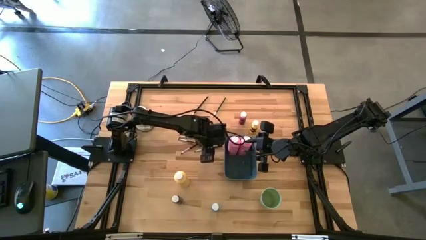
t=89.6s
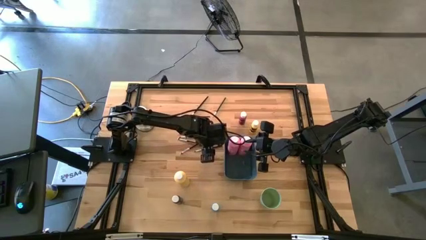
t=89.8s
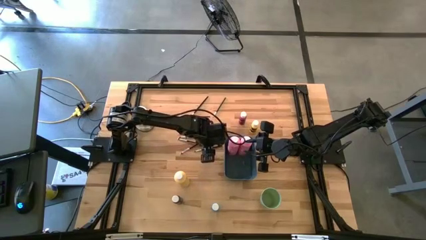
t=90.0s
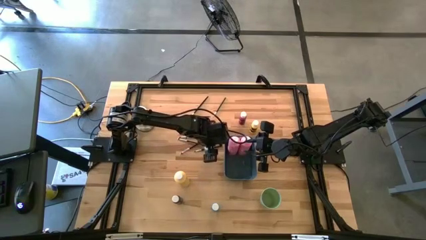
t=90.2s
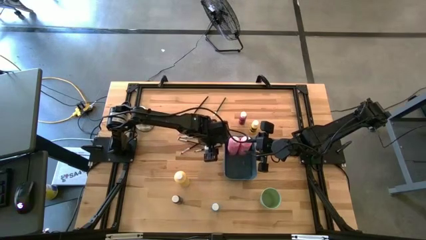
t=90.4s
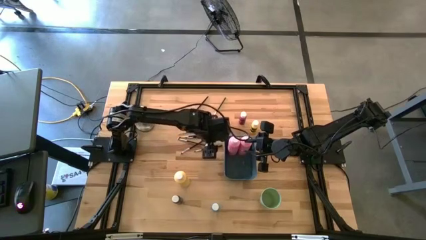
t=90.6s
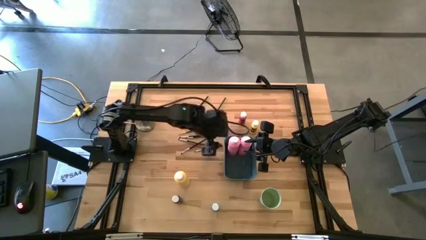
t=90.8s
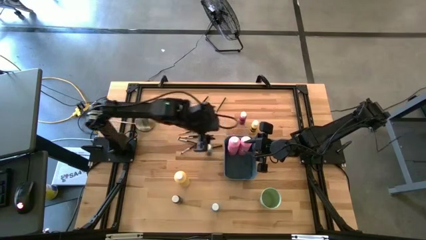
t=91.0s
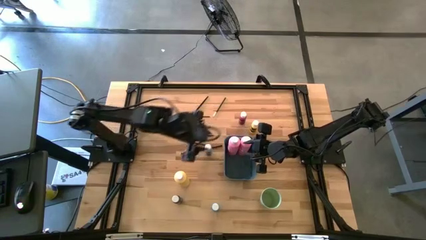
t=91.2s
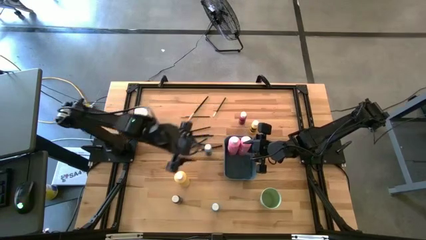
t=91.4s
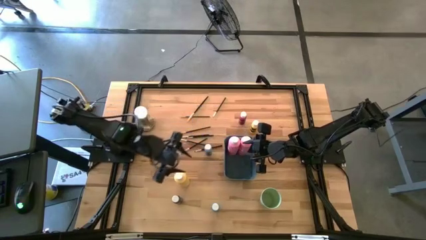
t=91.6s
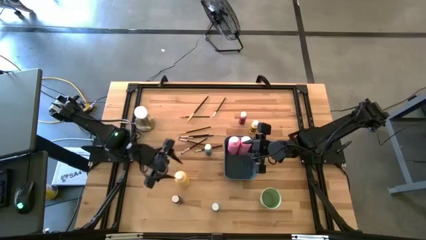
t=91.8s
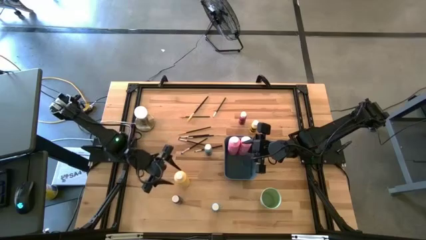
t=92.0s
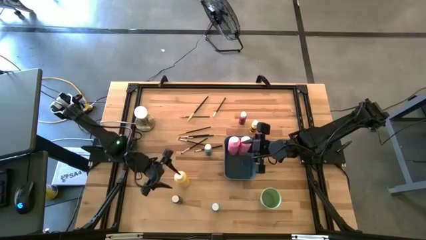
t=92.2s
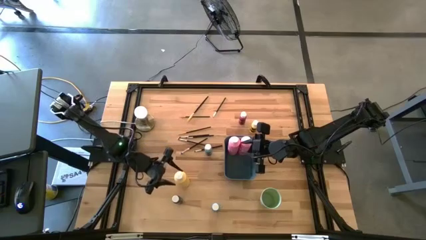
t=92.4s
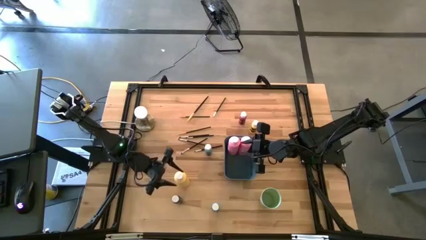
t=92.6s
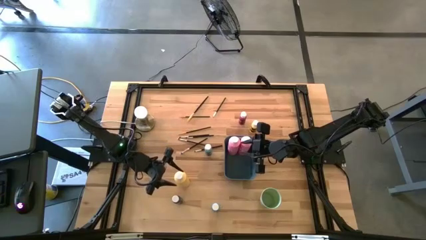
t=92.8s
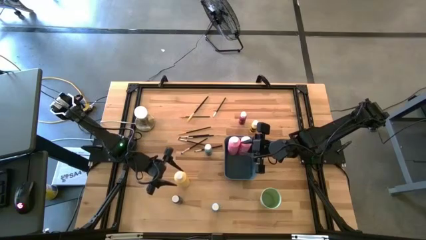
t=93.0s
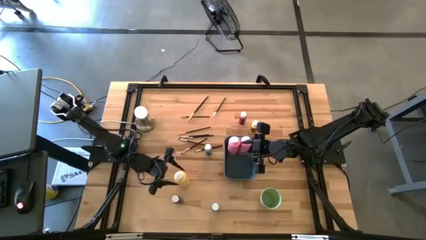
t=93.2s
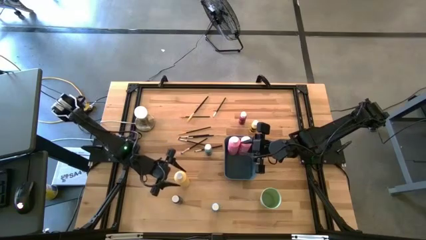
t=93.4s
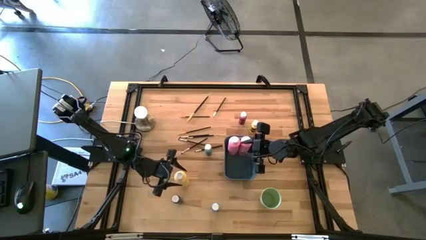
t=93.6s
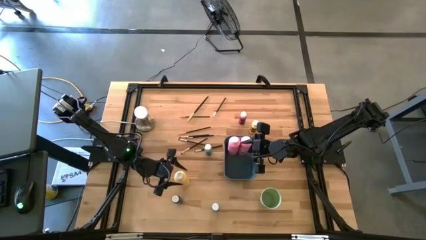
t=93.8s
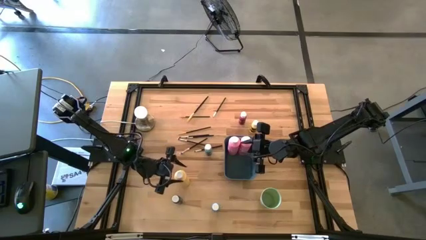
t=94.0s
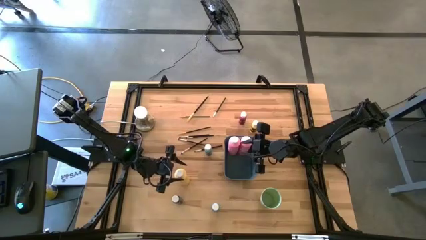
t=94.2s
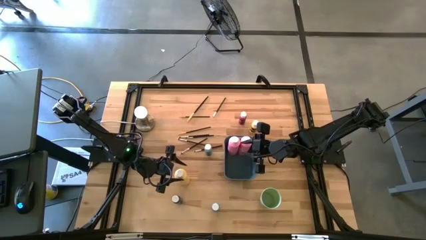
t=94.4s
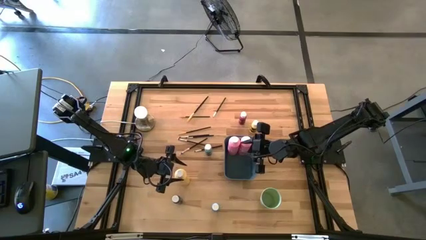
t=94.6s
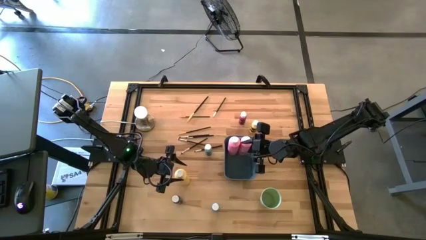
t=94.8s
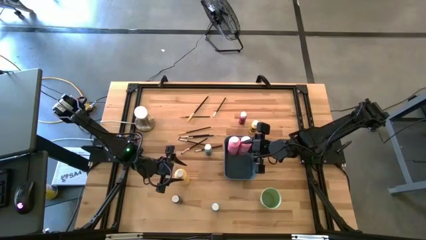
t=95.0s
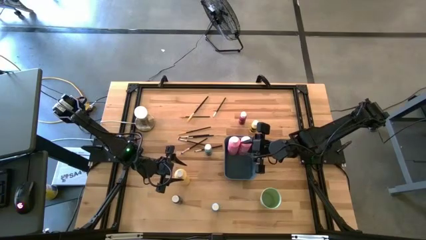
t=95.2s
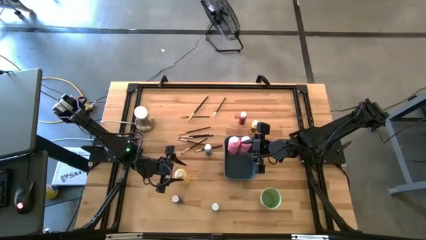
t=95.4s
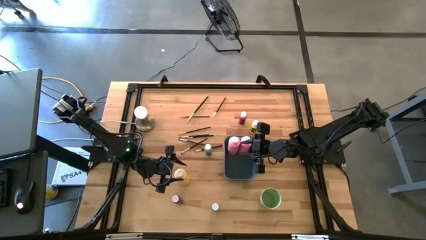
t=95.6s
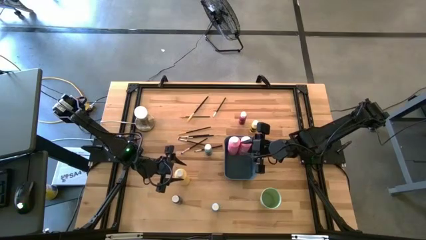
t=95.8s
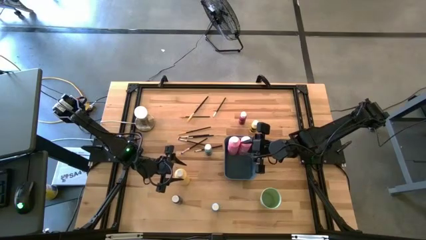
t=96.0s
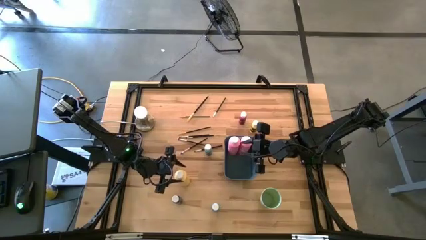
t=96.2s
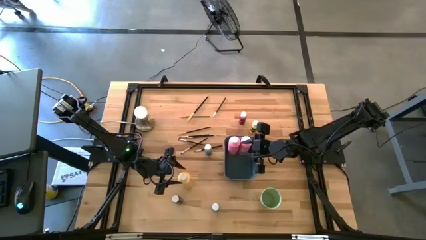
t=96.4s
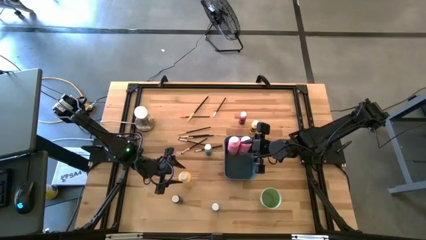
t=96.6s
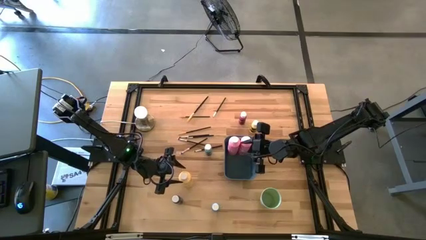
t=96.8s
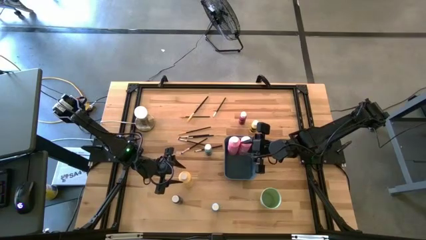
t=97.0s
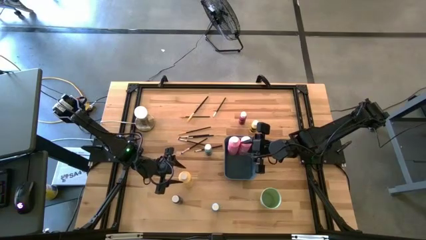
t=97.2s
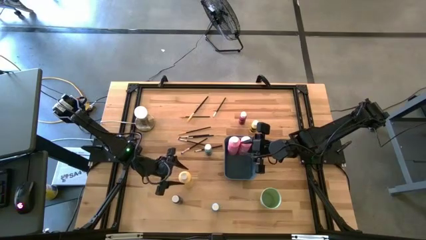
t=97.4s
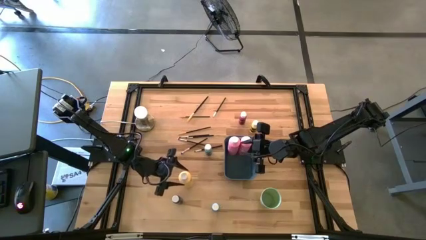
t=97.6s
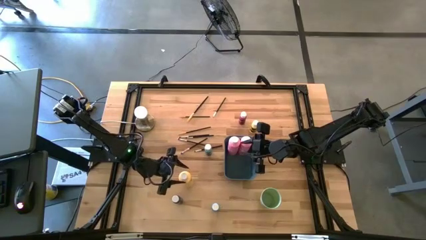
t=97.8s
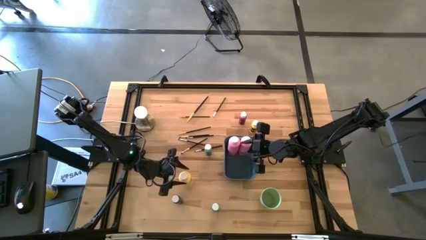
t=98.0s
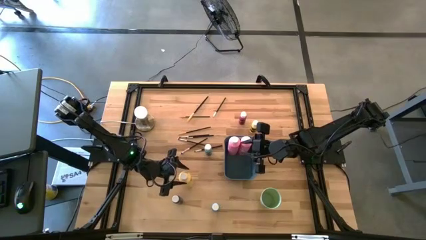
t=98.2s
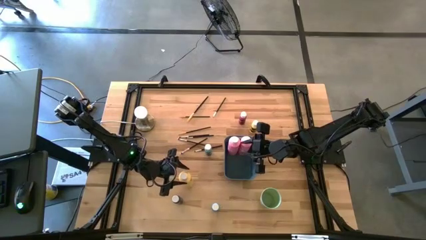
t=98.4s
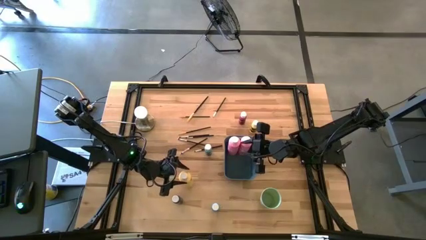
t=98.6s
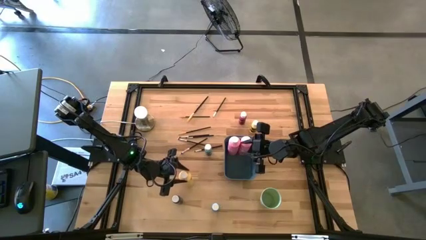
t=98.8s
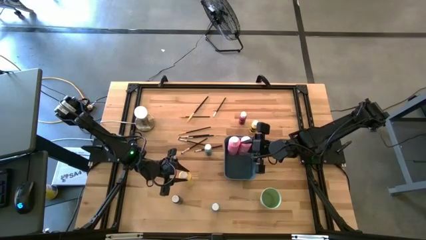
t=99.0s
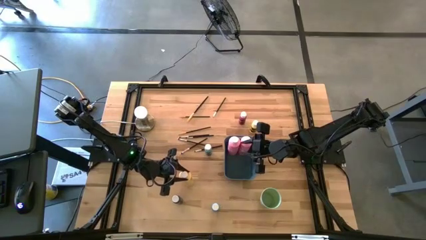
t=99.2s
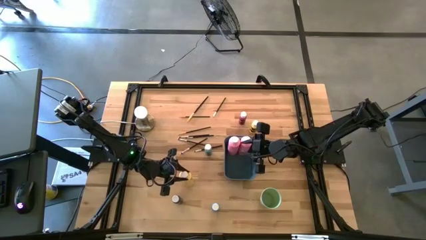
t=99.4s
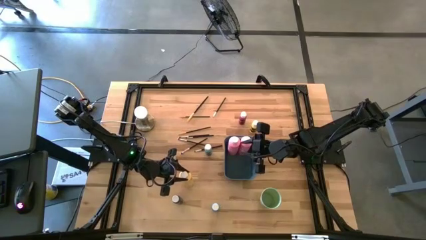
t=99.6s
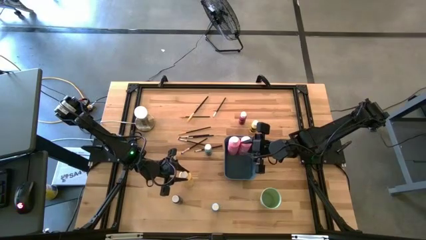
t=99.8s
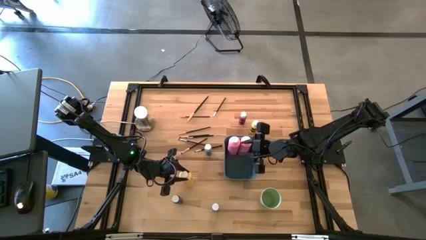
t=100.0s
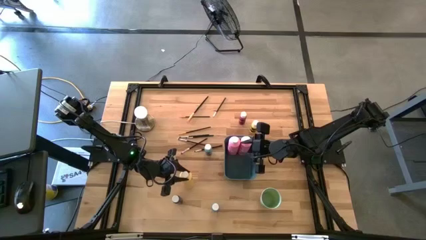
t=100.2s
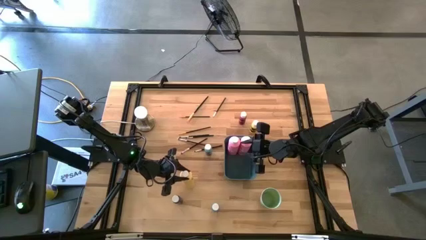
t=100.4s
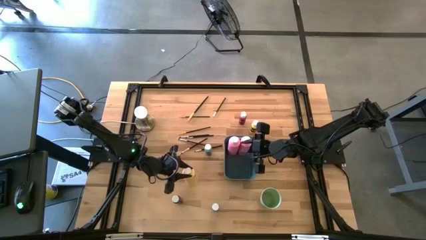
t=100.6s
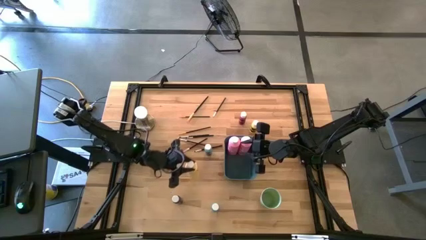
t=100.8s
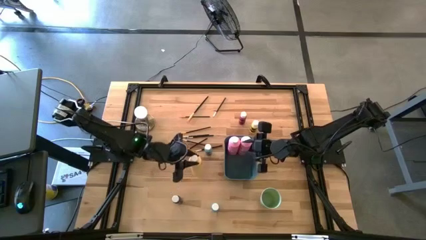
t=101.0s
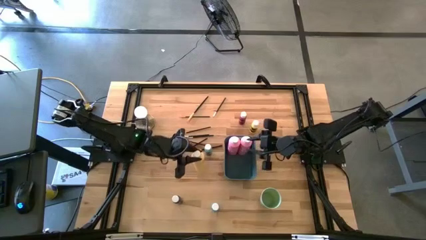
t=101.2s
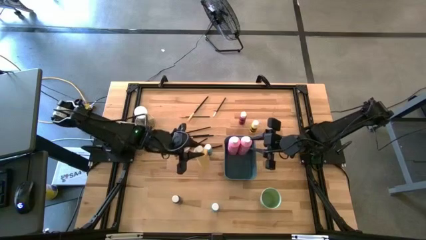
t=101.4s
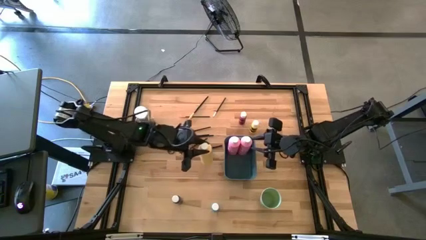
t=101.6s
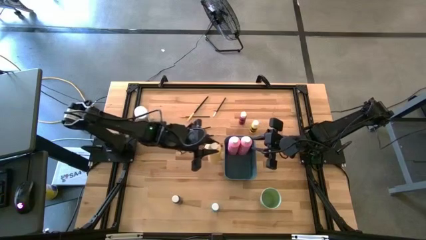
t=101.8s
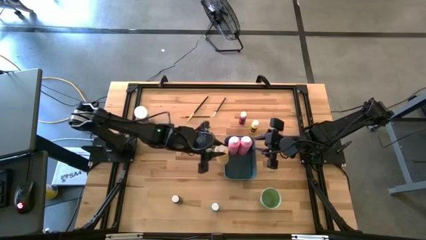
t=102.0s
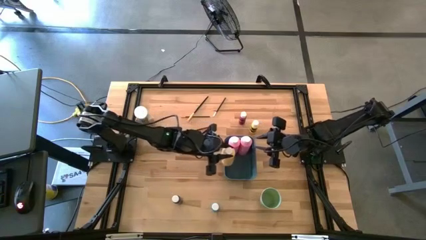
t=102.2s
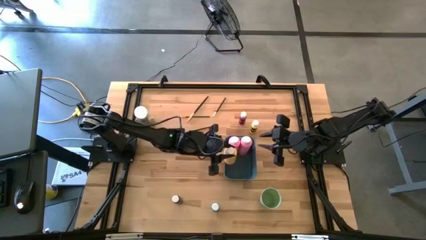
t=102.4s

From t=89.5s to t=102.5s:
Task: Pick & Place Paint Supplies
Put the large yellow paint bottle into the blue bin

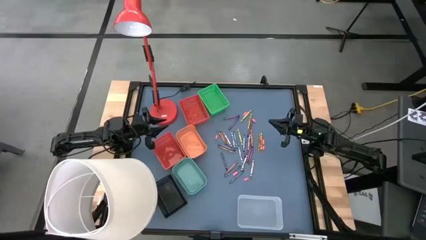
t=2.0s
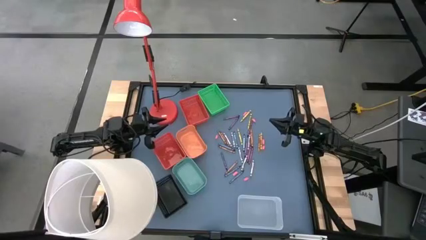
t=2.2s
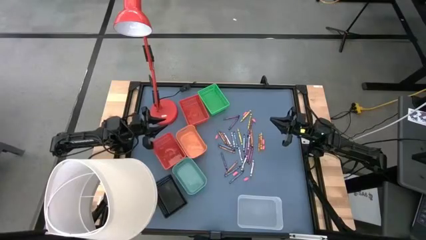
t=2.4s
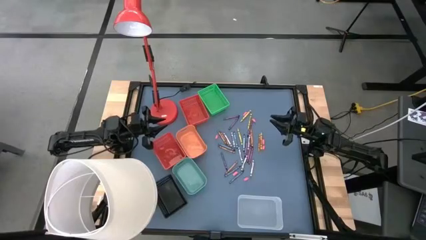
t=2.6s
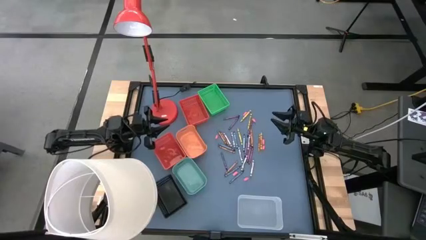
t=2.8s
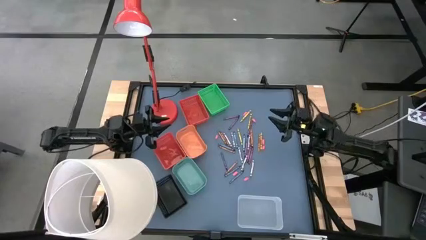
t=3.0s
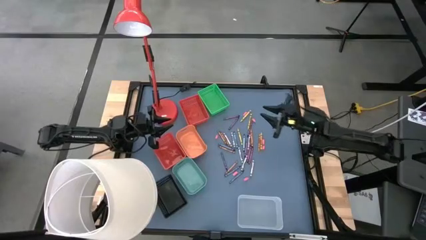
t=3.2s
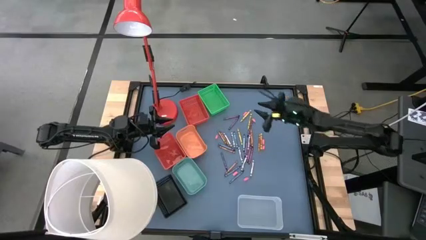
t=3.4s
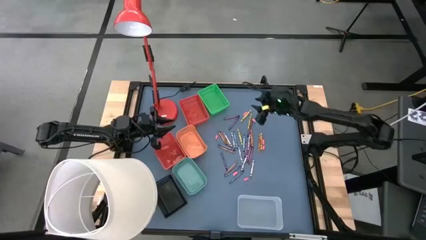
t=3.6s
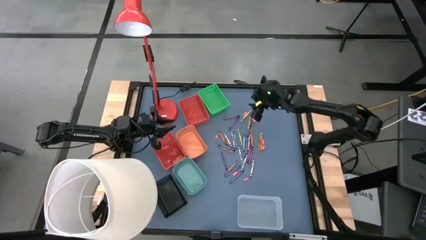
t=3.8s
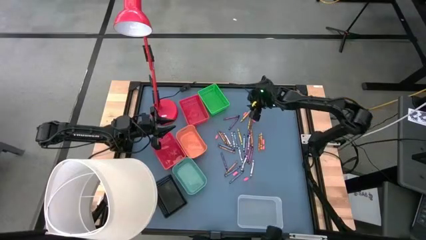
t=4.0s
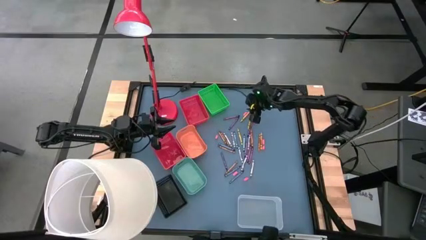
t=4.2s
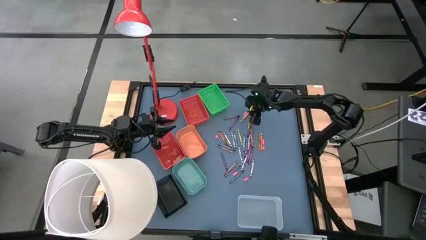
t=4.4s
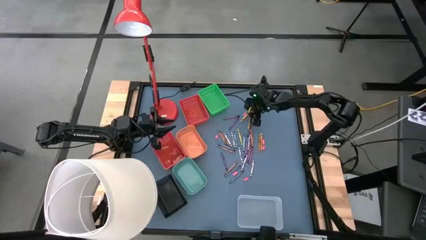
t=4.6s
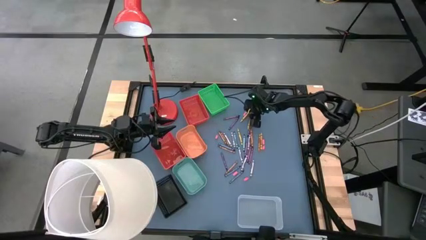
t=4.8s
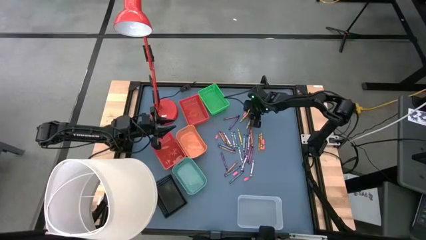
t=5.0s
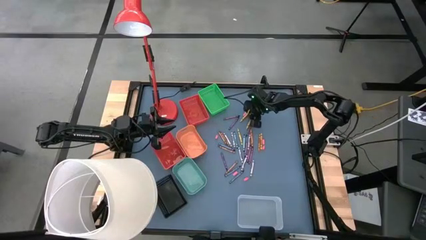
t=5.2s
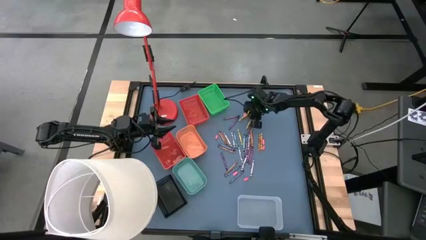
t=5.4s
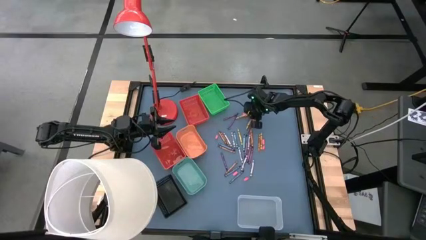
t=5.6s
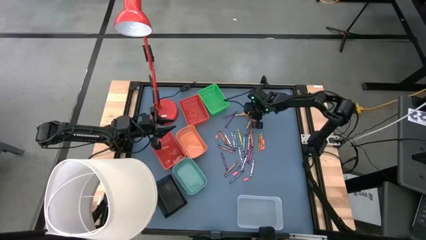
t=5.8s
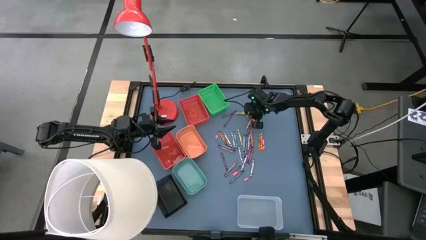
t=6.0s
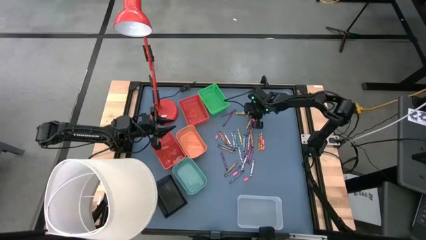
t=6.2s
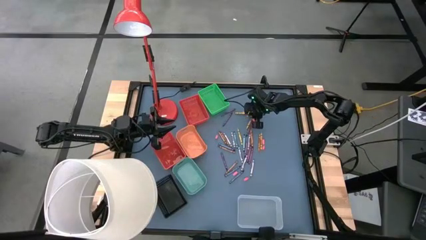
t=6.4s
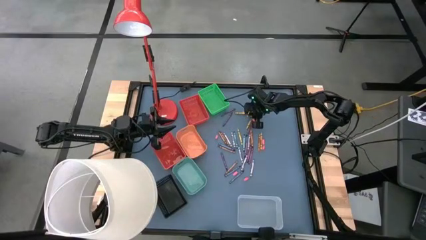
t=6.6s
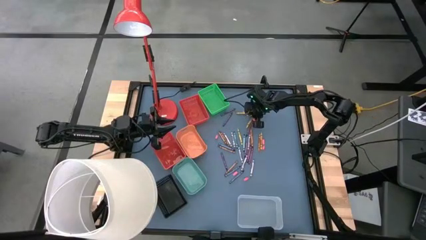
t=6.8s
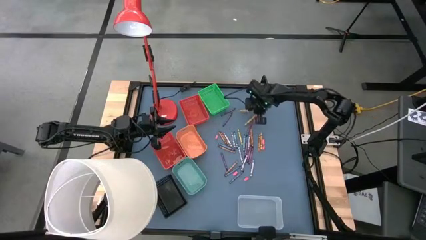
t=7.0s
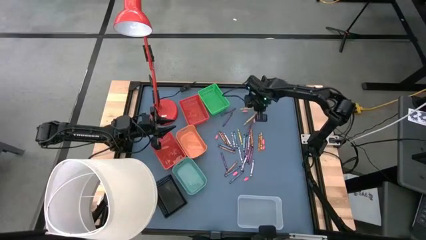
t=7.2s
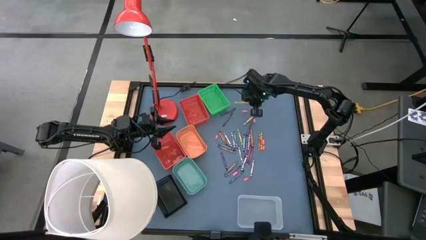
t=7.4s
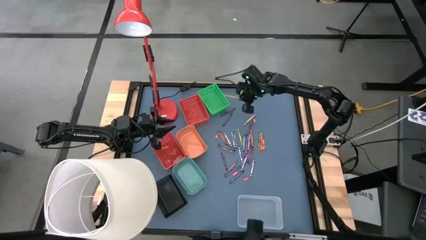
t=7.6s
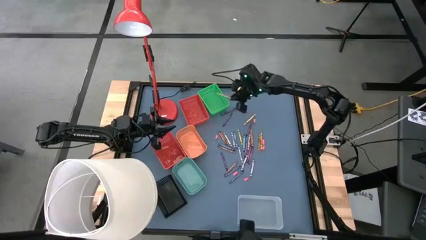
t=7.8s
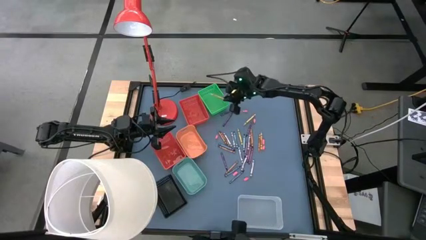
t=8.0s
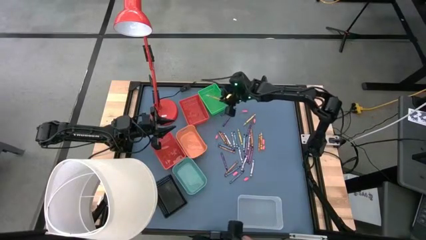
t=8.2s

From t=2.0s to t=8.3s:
Task: Sort crayons
Put the yellow crayon into the green basket
